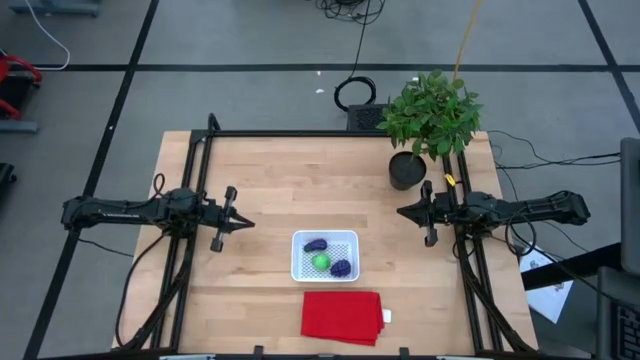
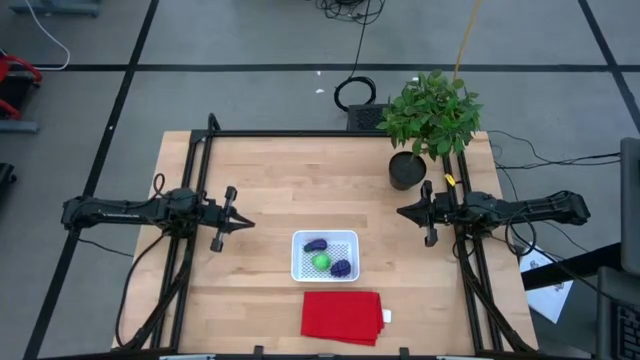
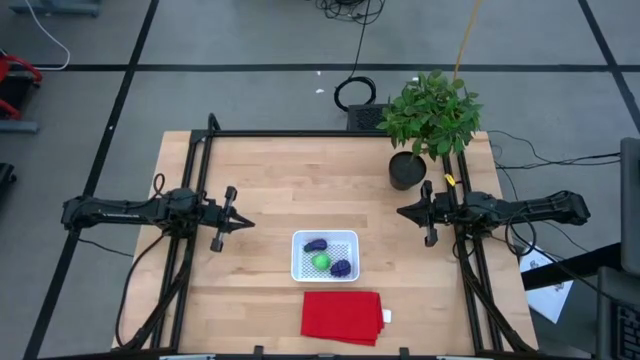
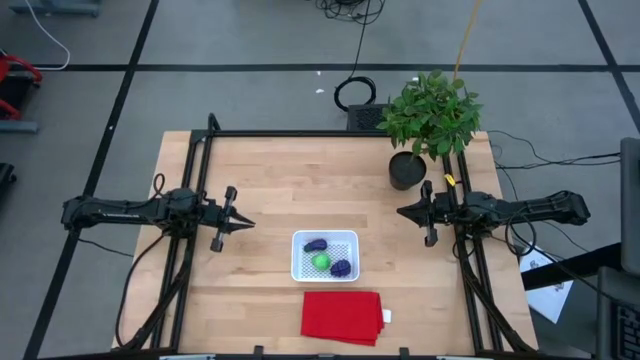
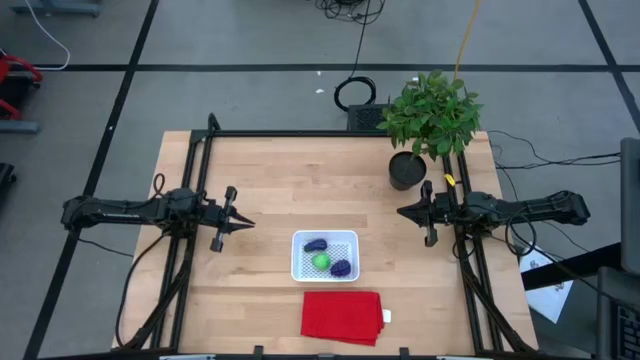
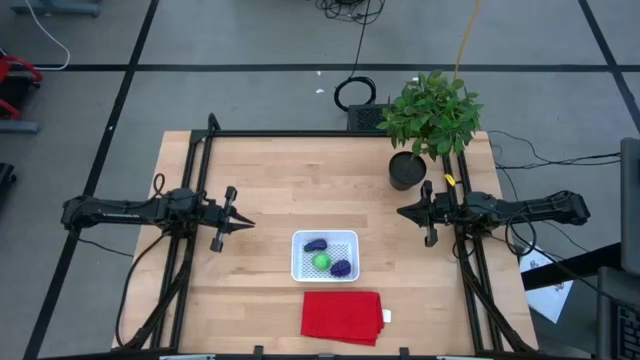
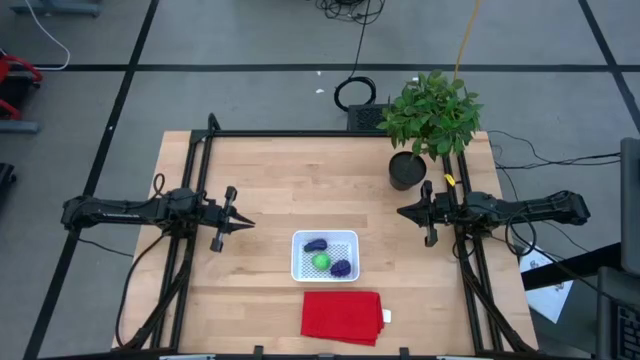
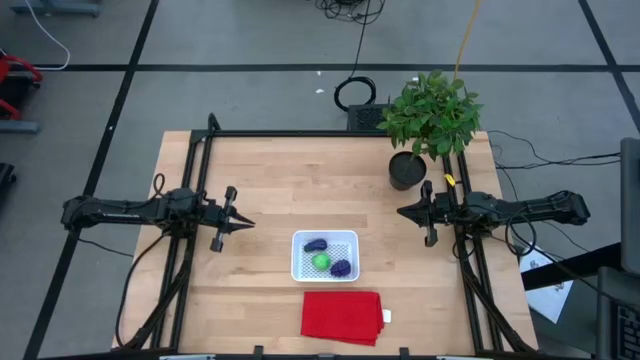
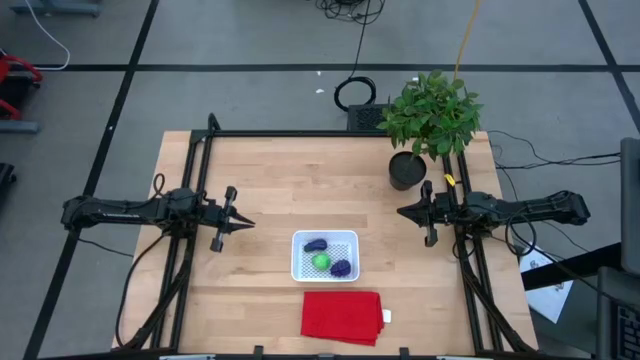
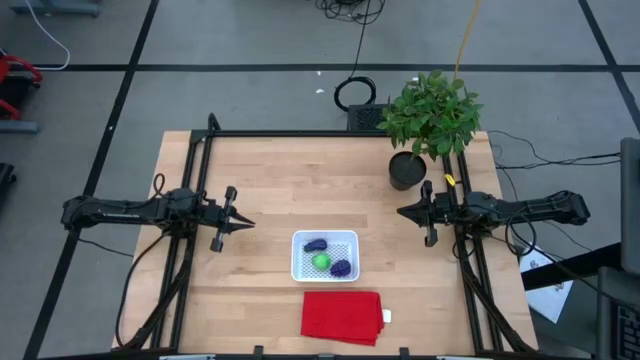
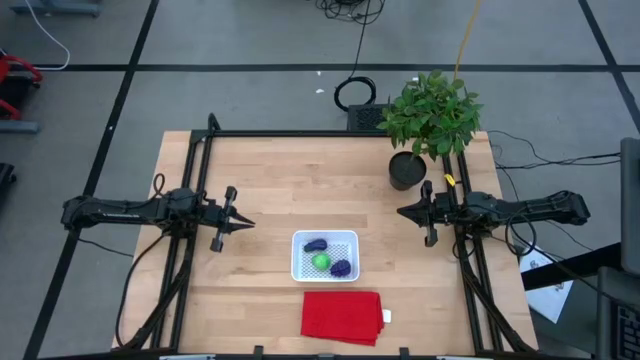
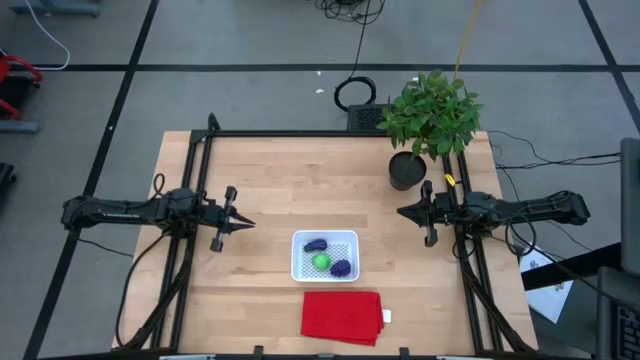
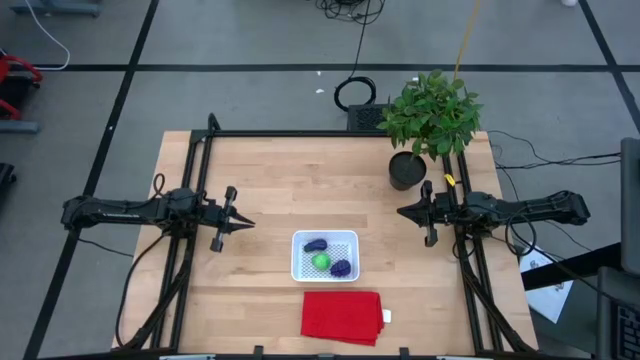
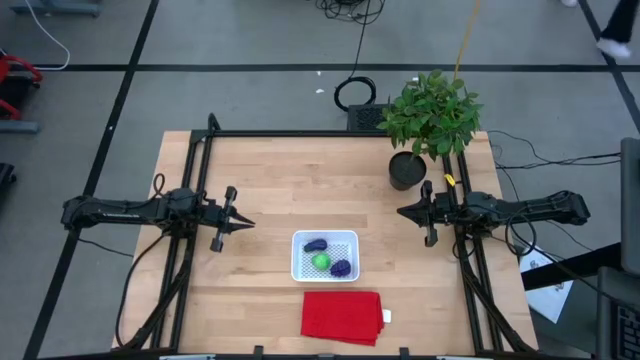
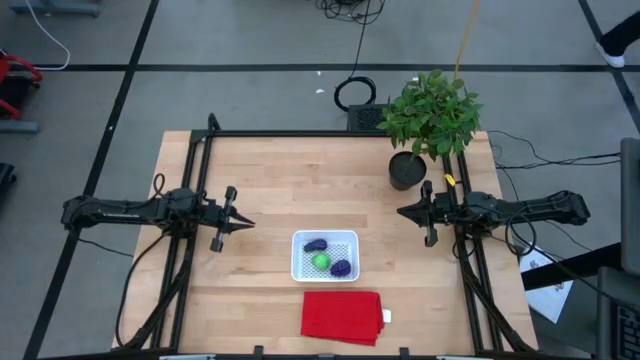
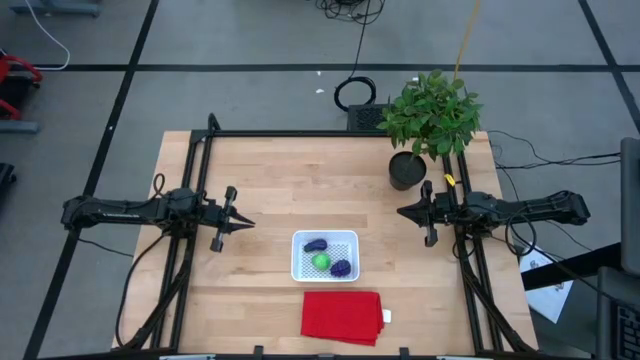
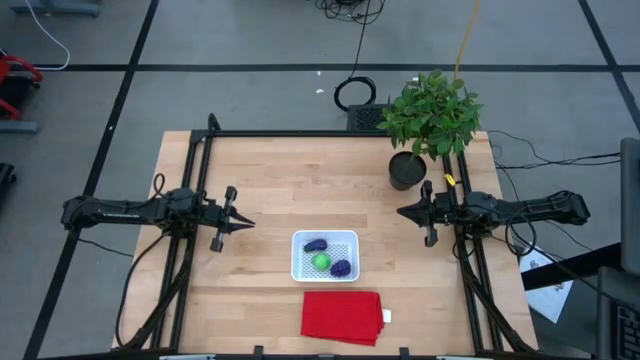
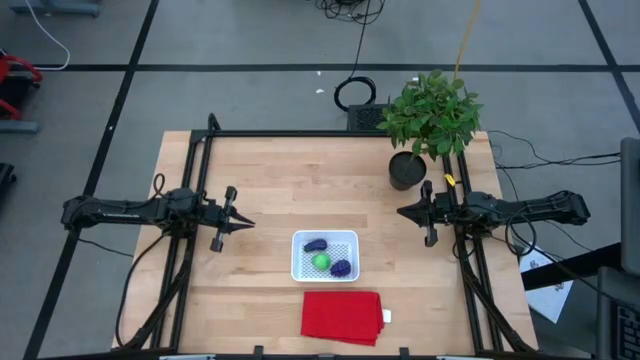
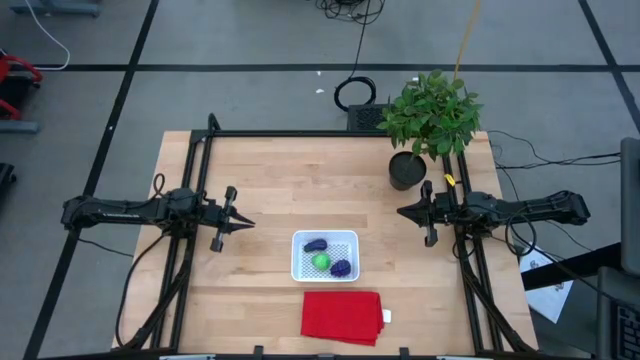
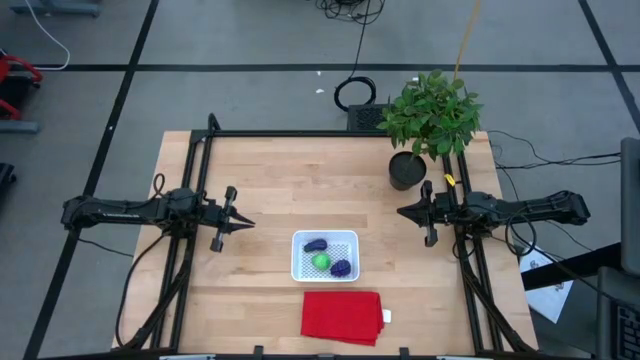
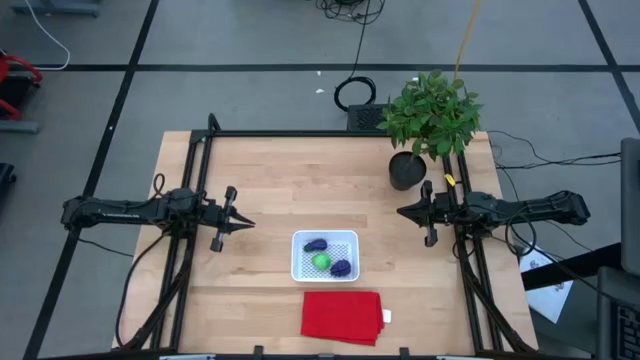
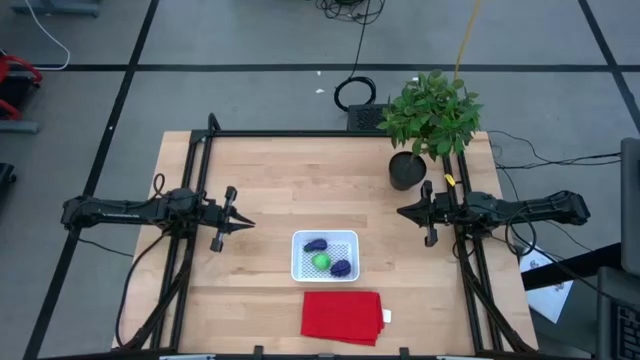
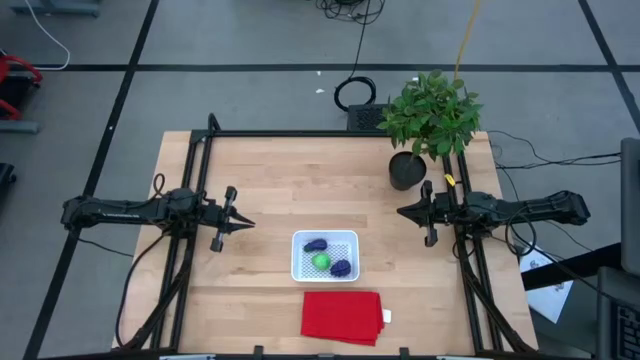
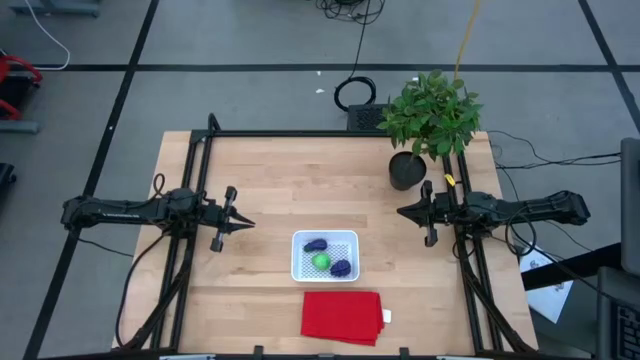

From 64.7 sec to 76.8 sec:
Task: Pick and placing Produce into tupperware
Return to Home Position

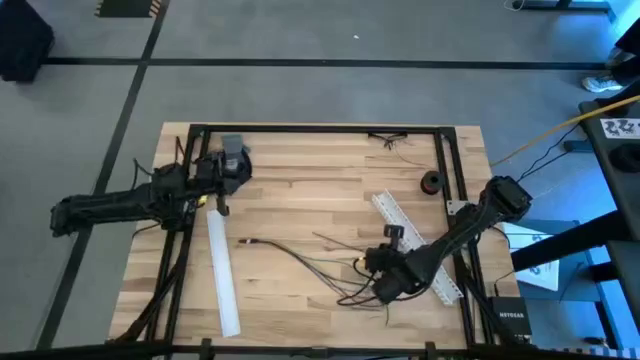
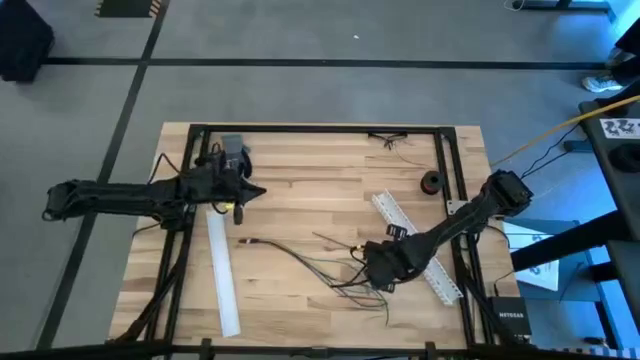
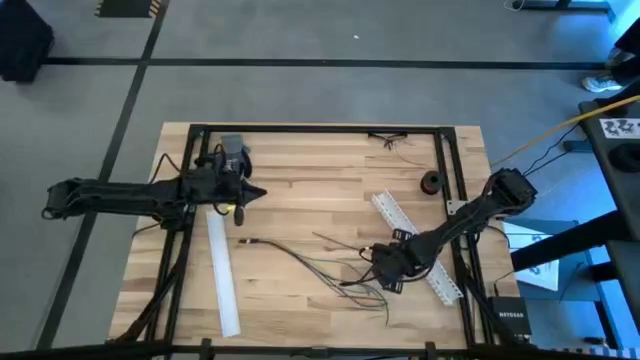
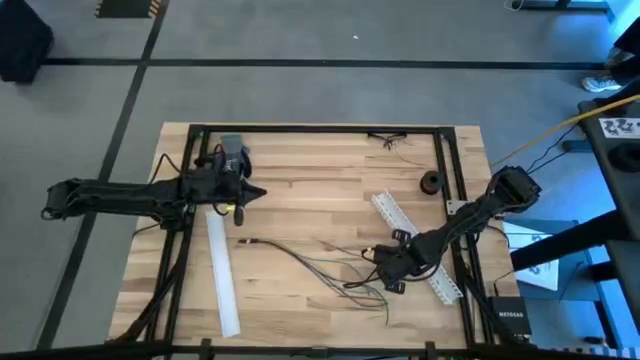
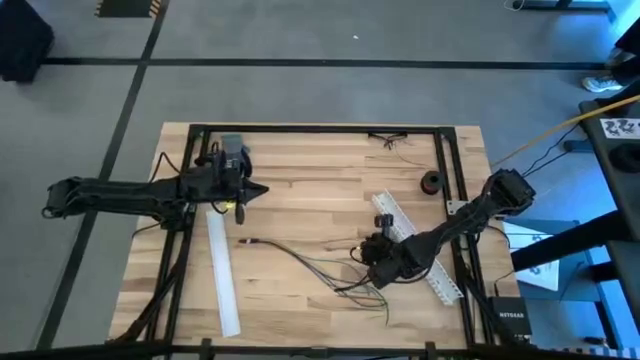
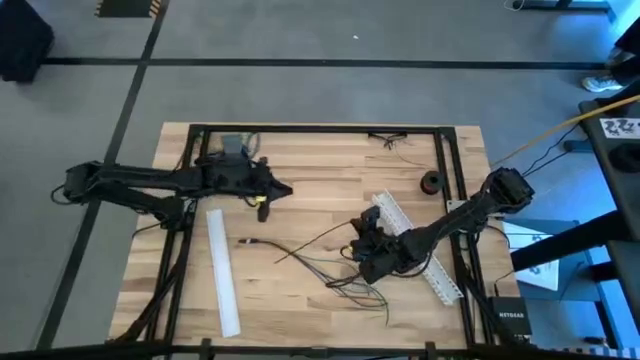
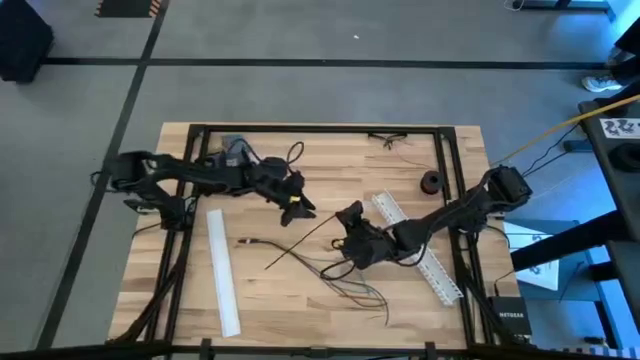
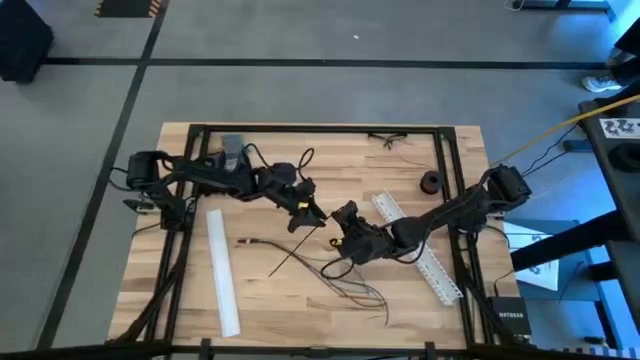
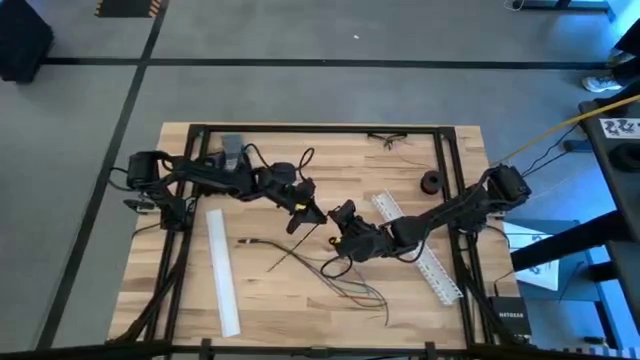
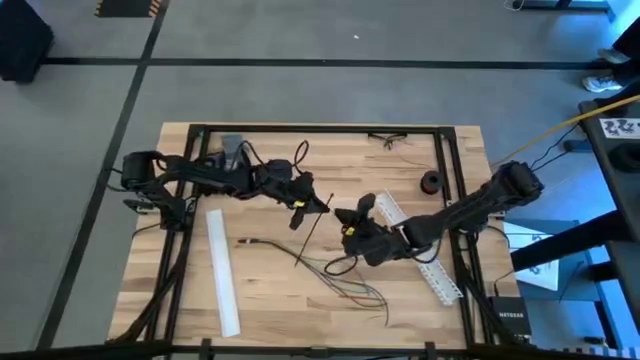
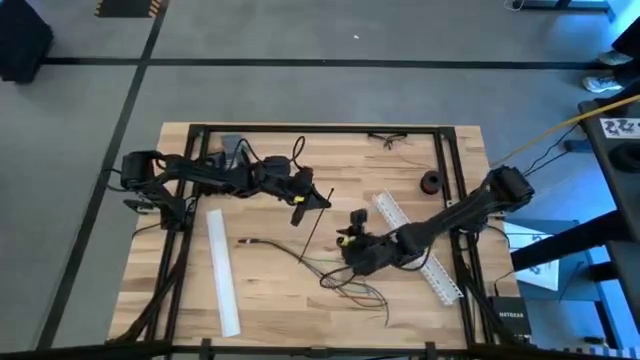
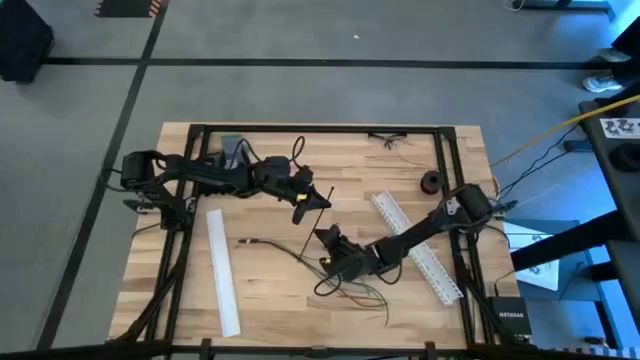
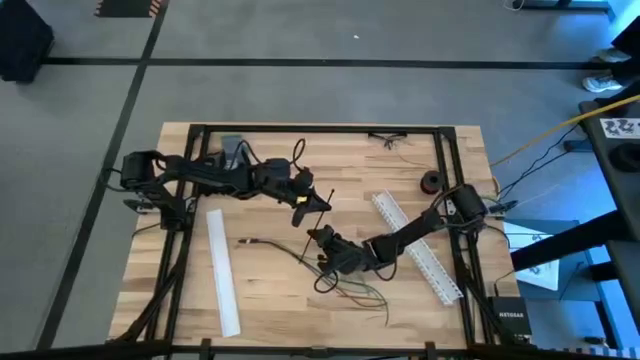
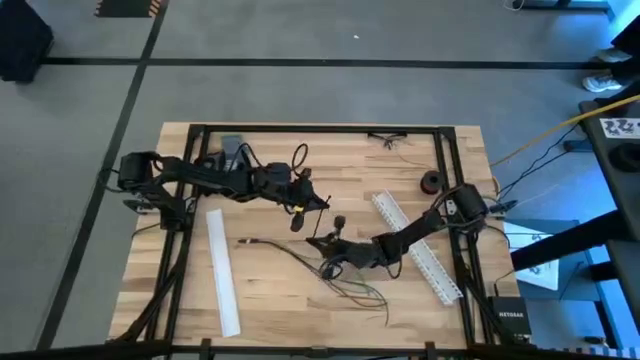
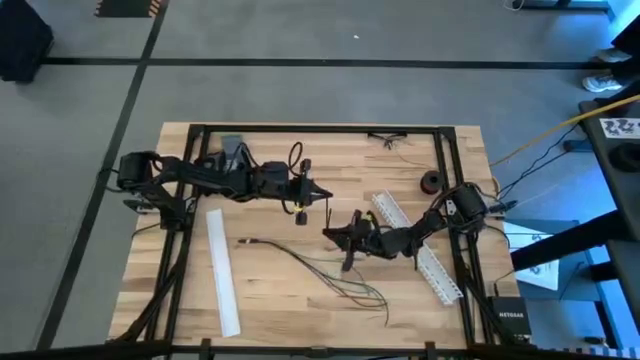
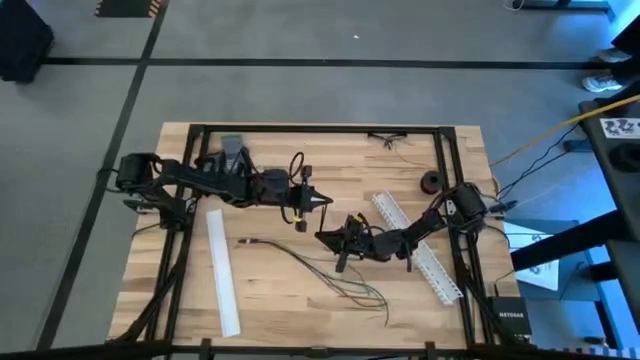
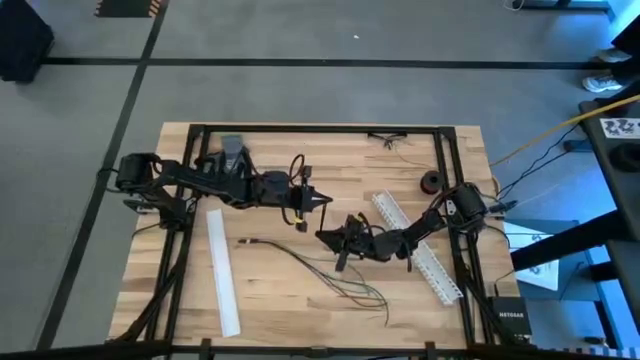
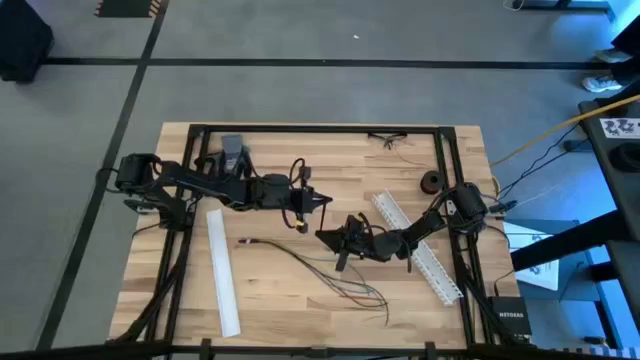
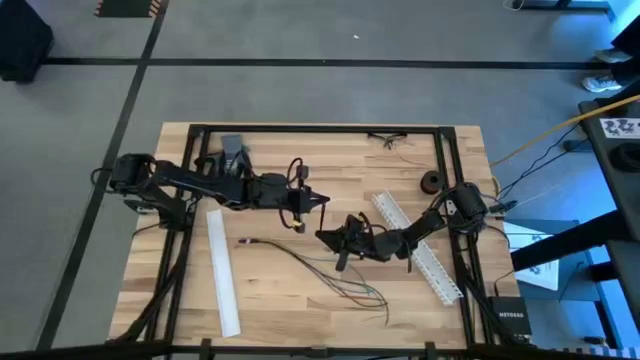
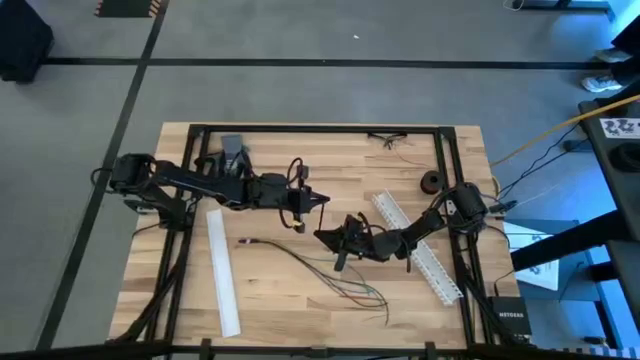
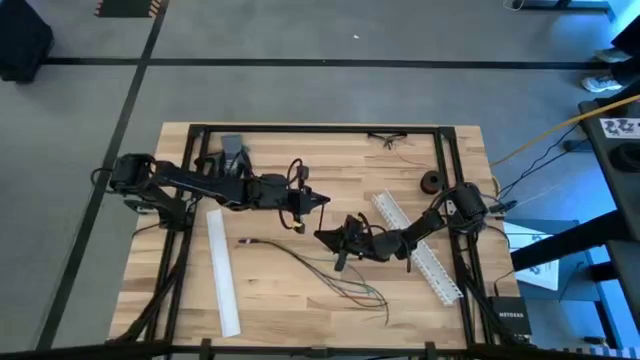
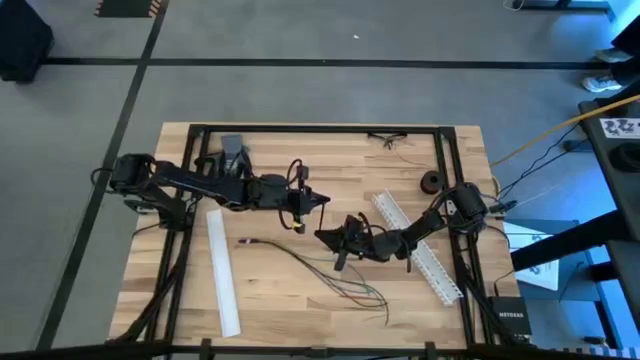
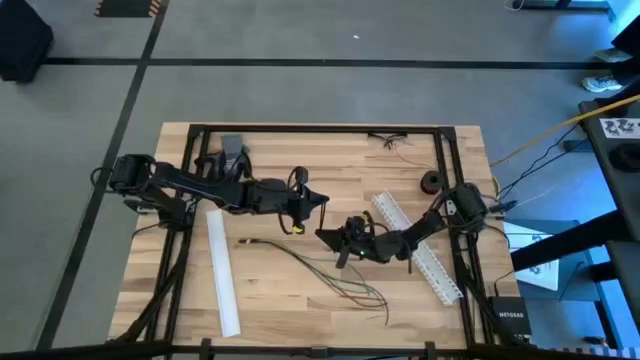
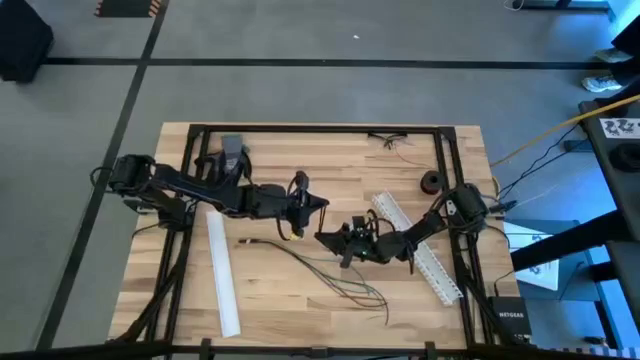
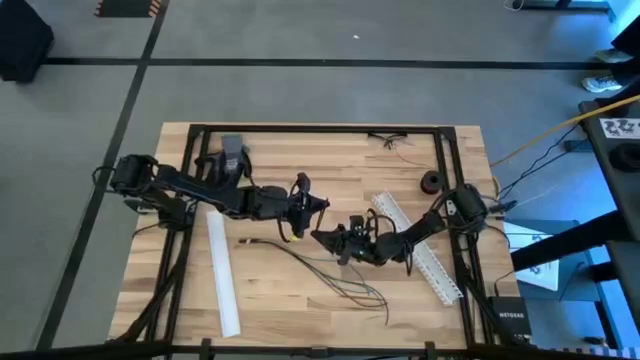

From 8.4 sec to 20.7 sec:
Task: Ziptie cables
Prepare the black ziptie
